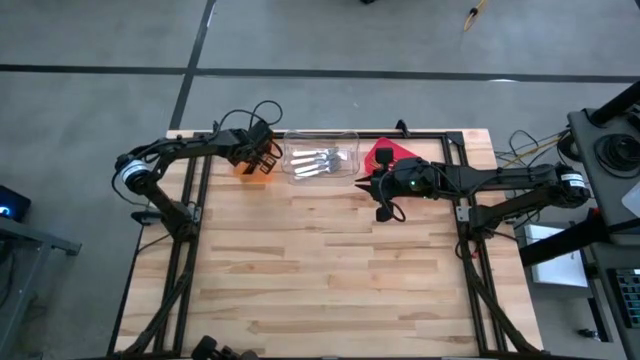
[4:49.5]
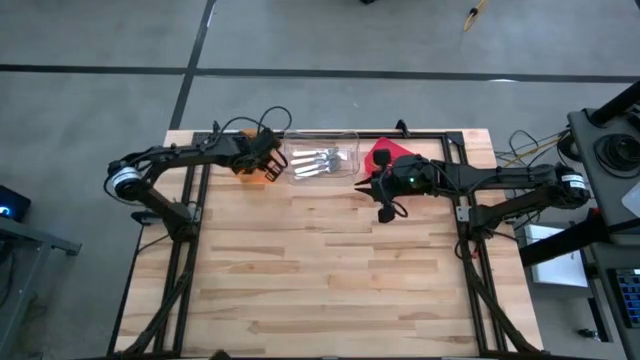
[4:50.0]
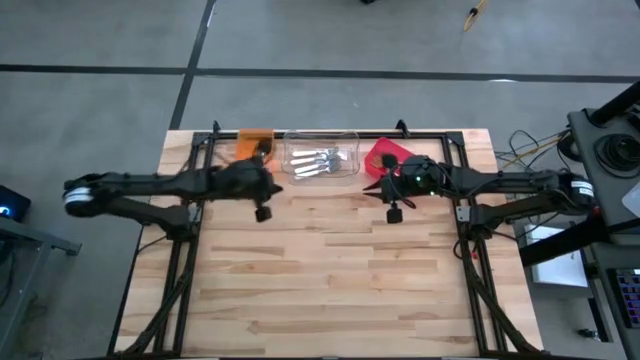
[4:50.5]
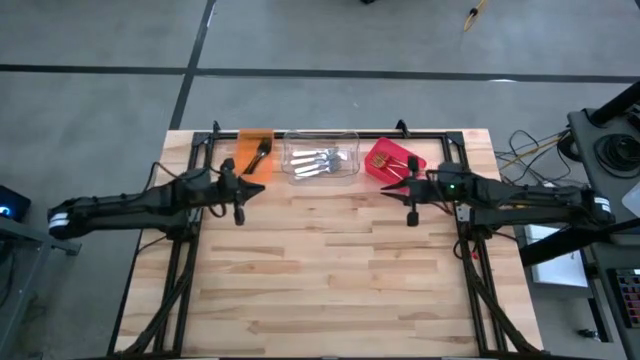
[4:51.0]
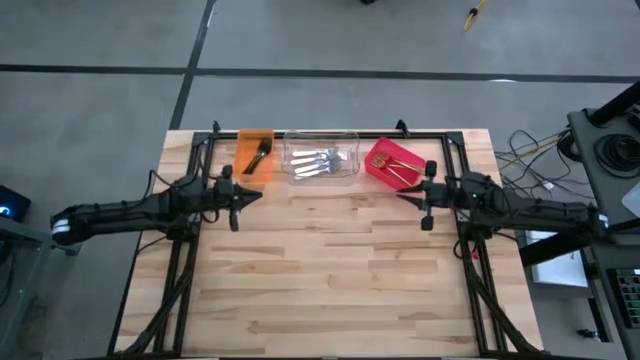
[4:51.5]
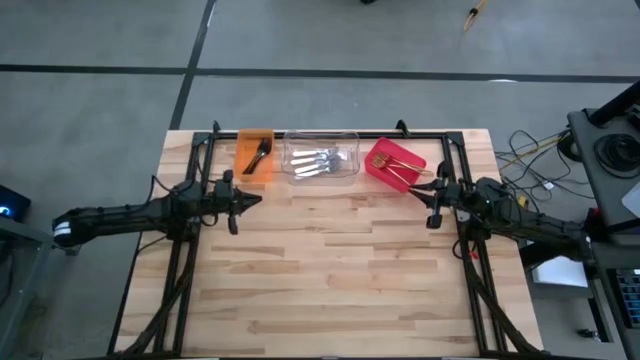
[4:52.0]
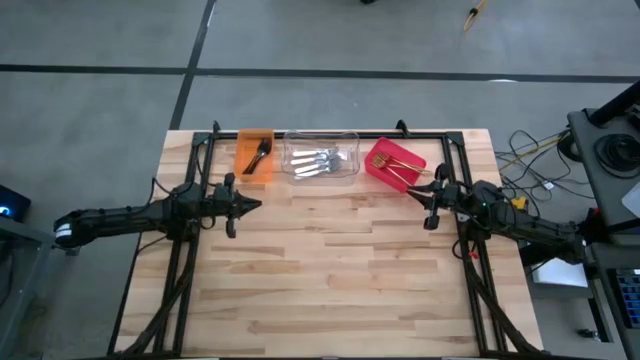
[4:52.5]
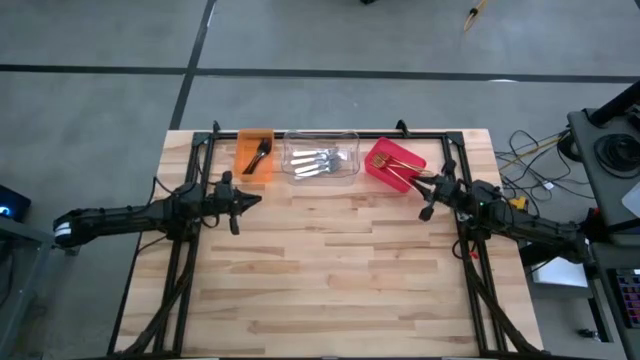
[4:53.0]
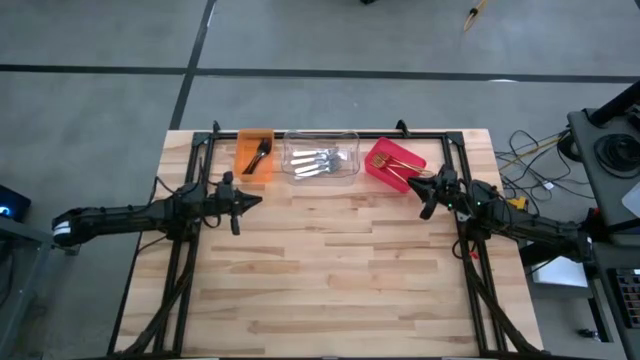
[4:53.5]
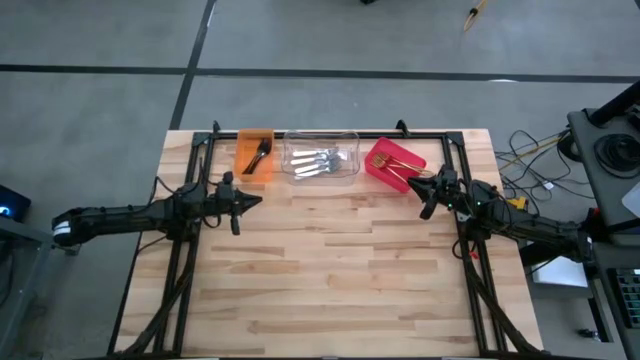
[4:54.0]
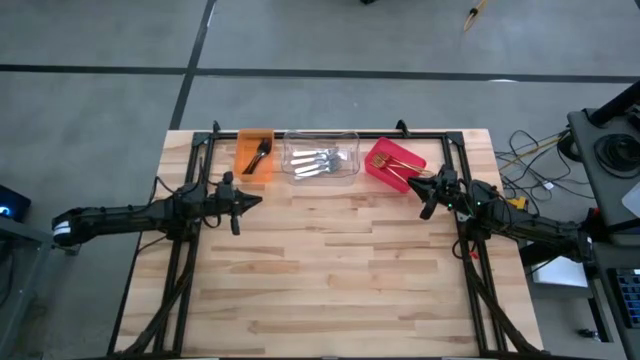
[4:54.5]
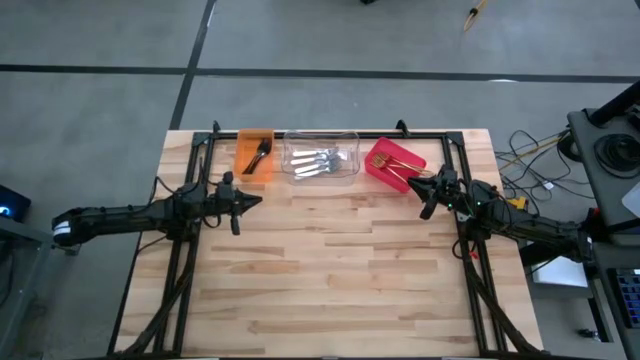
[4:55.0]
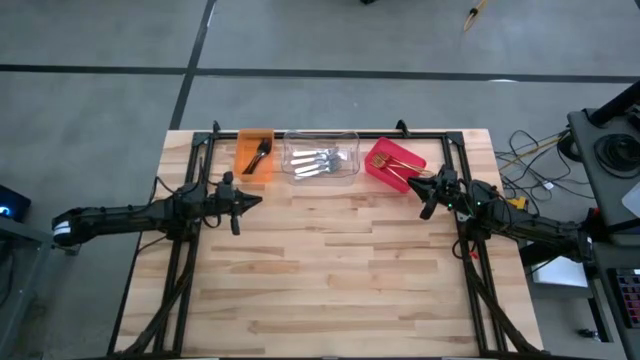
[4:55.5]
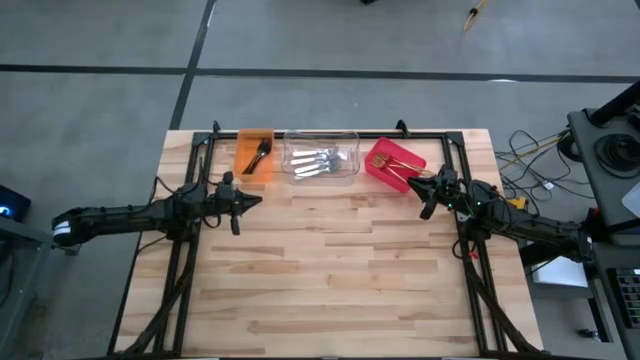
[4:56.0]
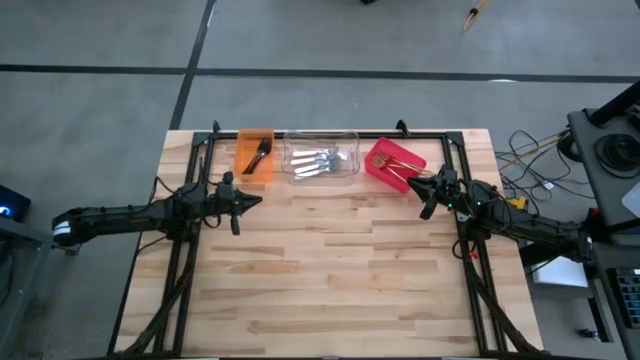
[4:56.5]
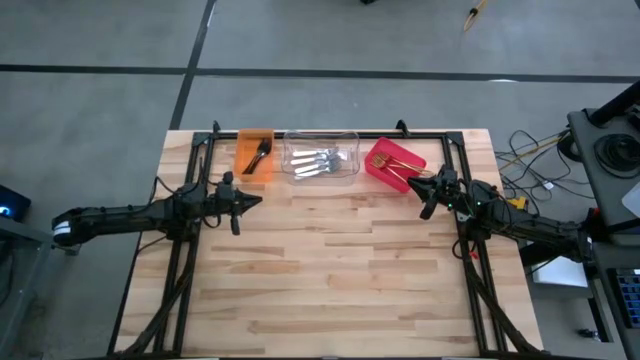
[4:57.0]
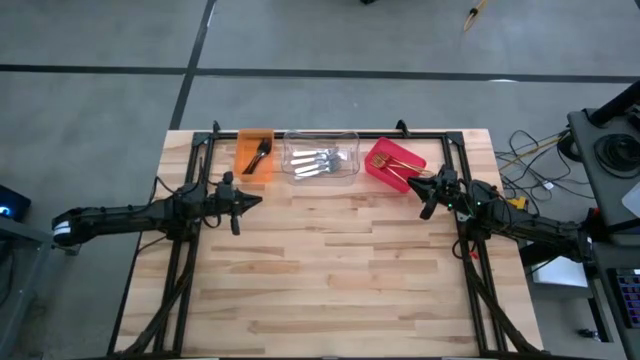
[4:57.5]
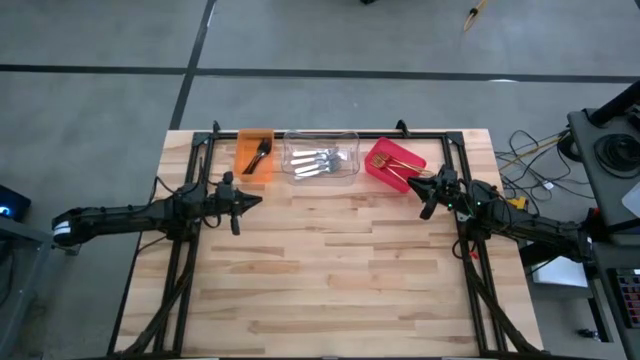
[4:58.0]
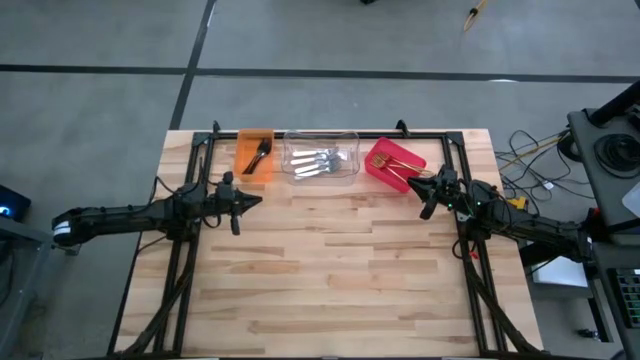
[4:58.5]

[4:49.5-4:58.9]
Task: Sort silverware by color (type)
Return to Home Position

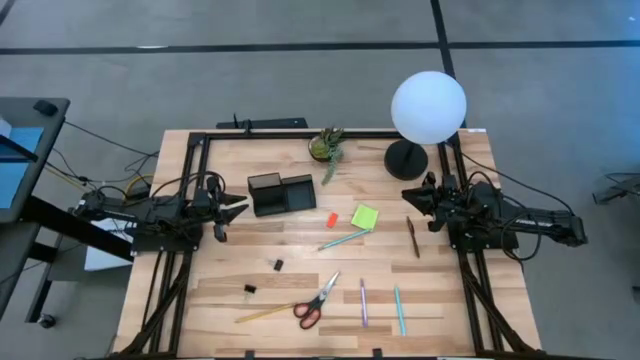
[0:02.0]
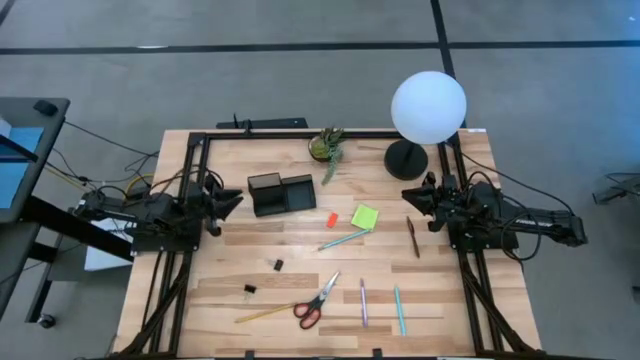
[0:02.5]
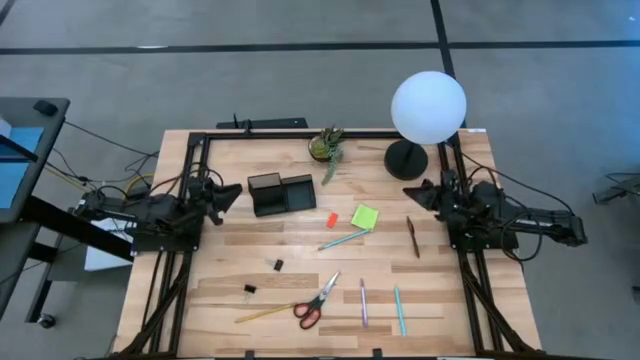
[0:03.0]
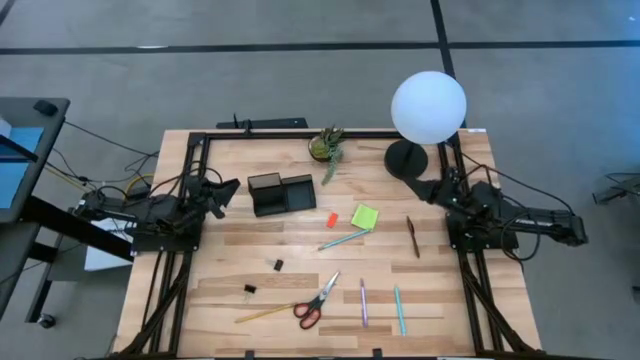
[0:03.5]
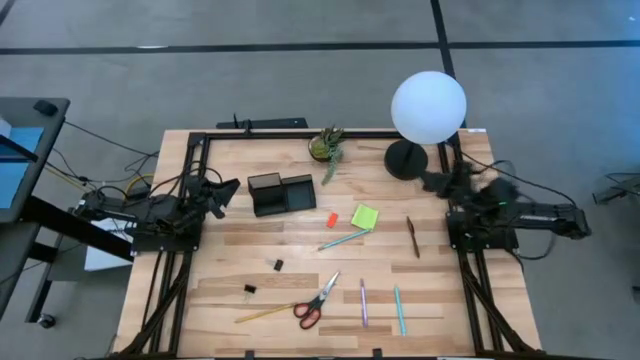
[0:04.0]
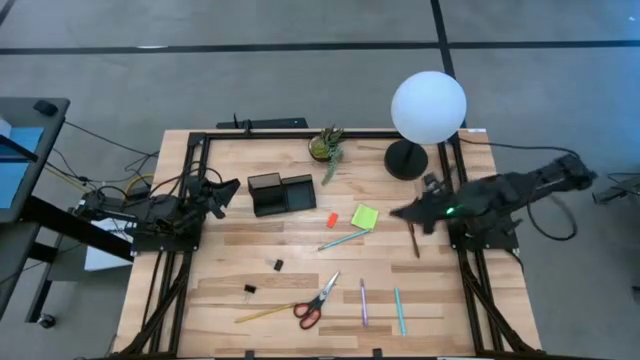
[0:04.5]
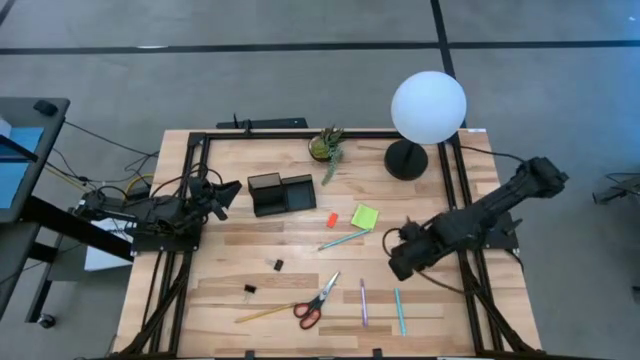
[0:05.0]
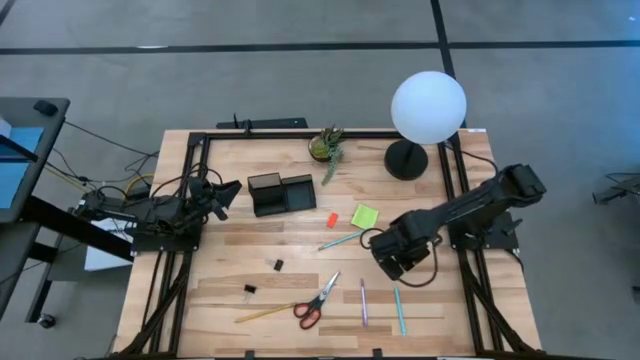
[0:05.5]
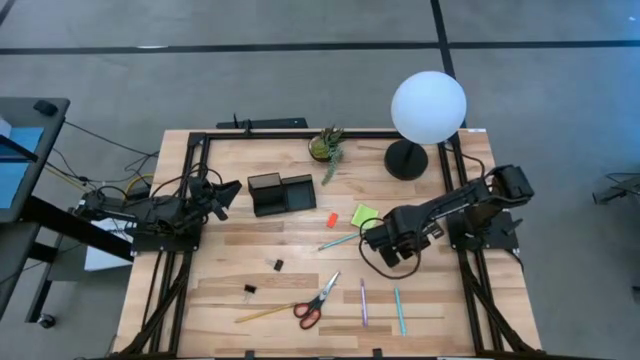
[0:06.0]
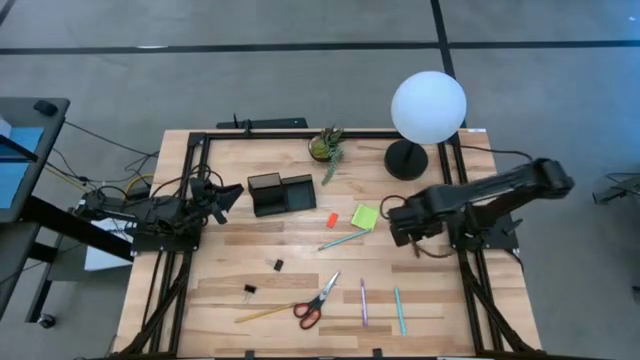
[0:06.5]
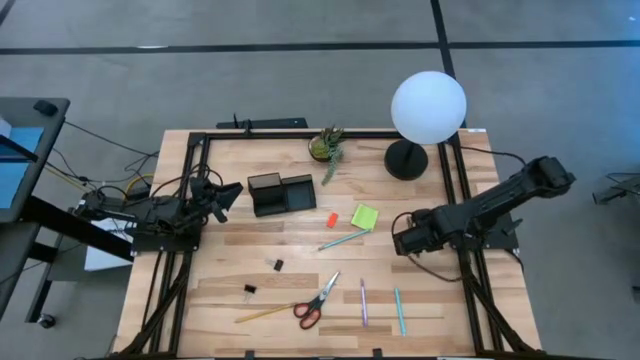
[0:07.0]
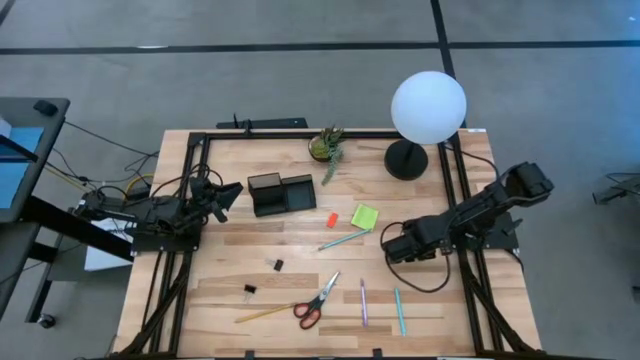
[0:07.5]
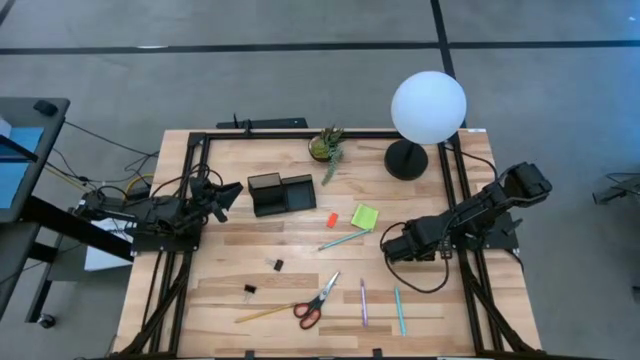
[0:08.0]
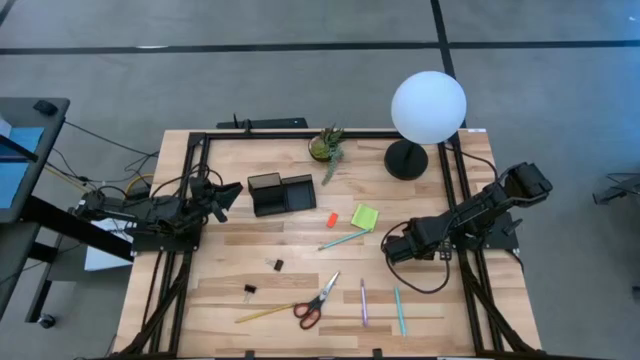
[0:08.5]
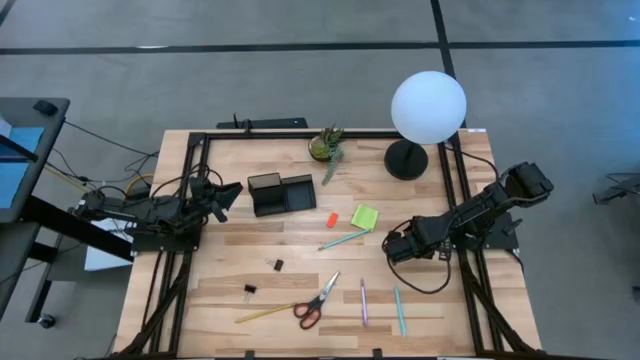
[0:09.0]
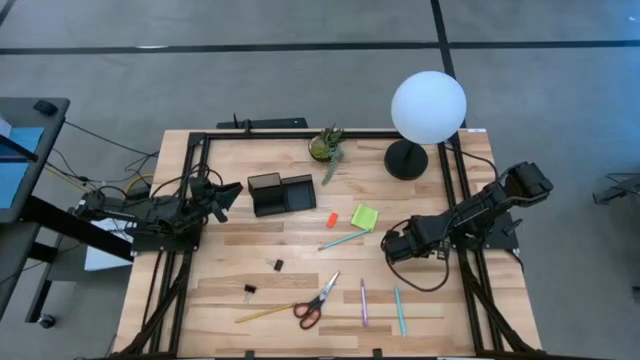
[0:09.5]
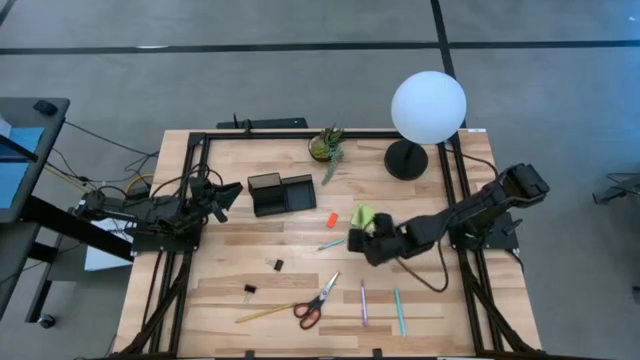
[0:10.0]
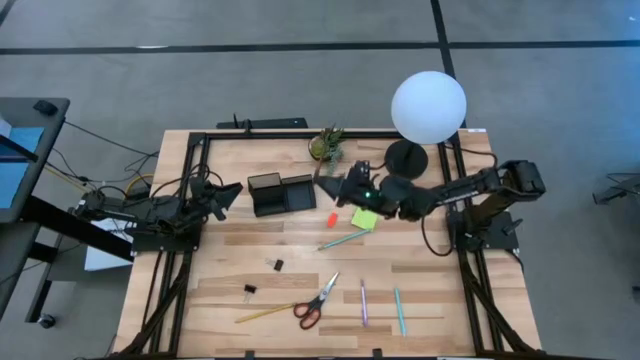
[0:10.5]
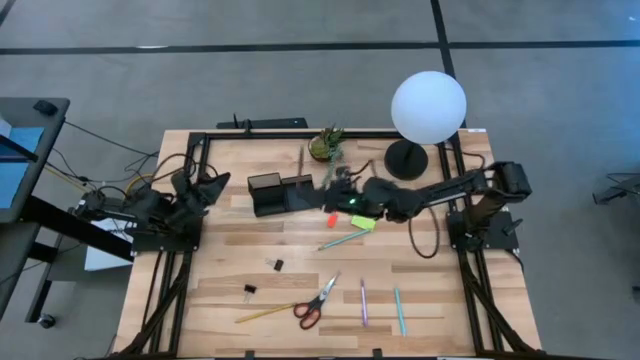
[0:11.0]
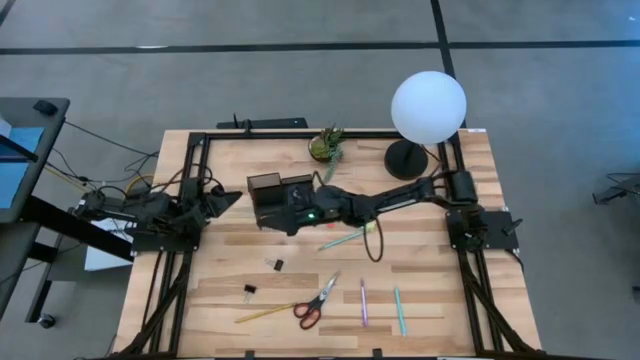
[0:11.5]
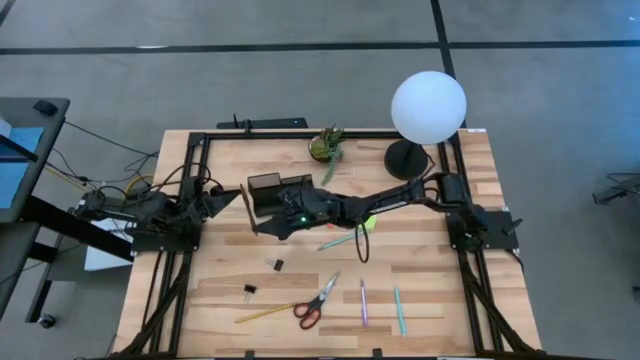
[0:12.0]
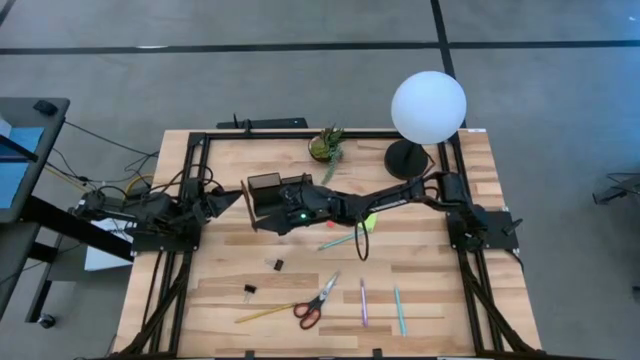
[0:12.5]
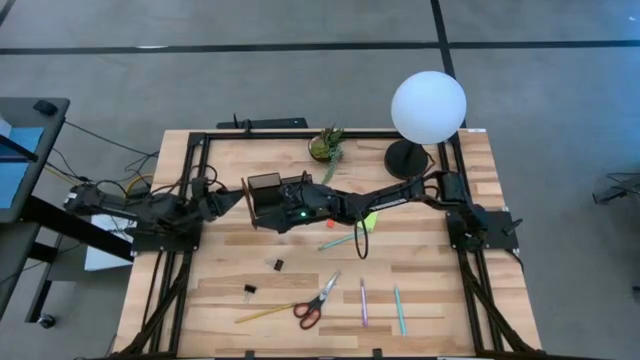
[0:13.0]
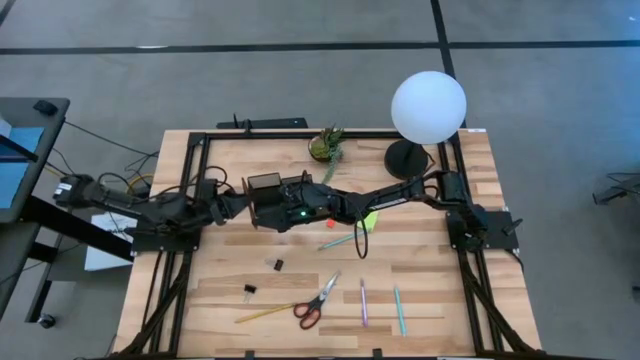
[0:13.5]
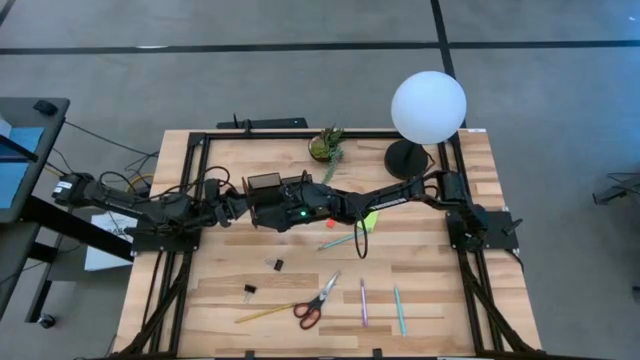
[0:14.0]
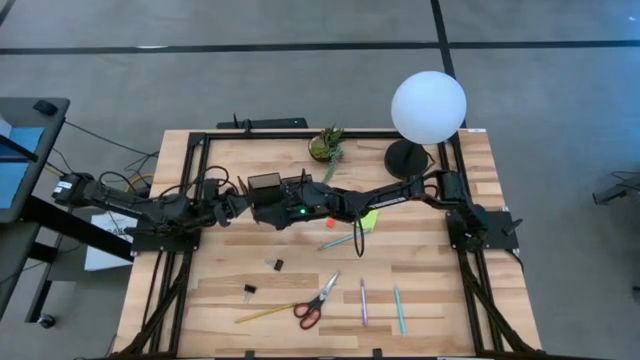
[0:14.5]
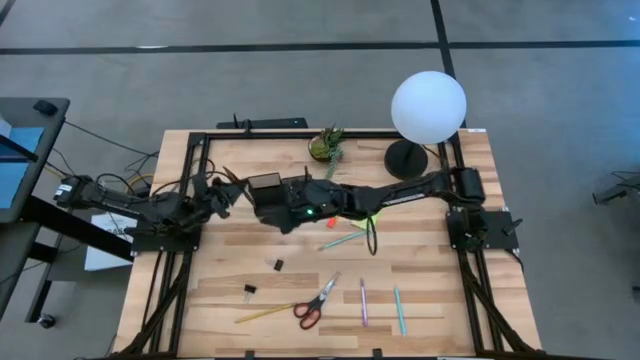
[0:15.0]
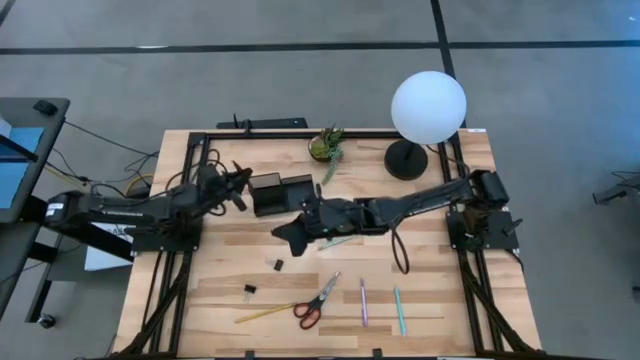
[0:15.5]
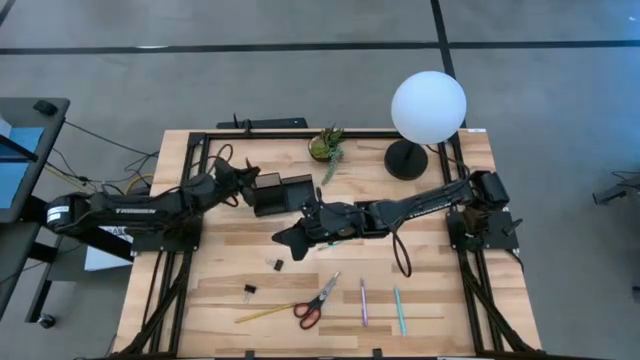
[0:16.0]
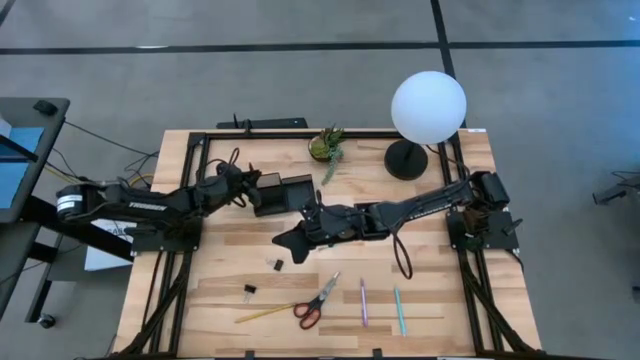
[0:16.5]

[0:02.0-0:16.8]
Task: Pick and place office supplies into organizer
Put the brown pen into the black desk organizer
